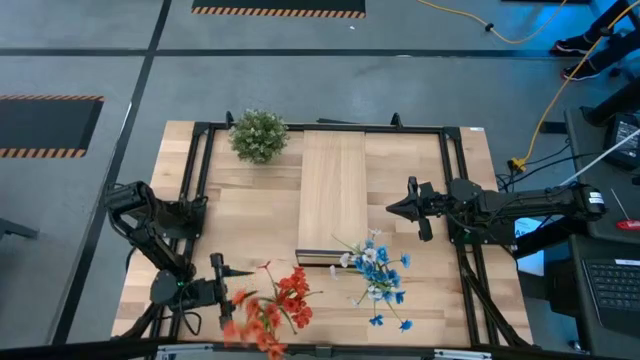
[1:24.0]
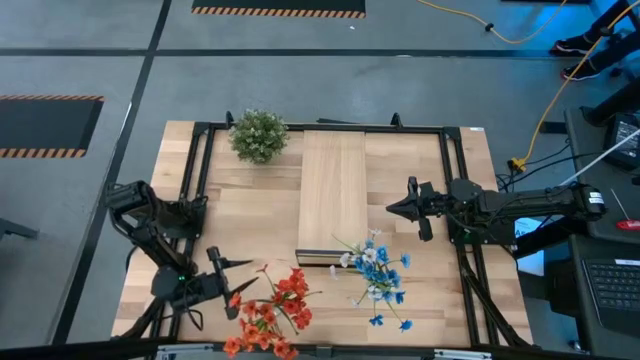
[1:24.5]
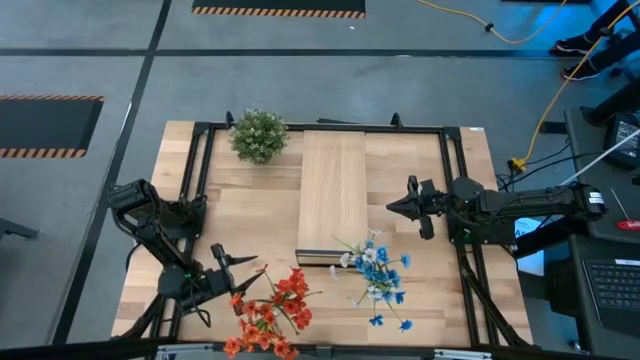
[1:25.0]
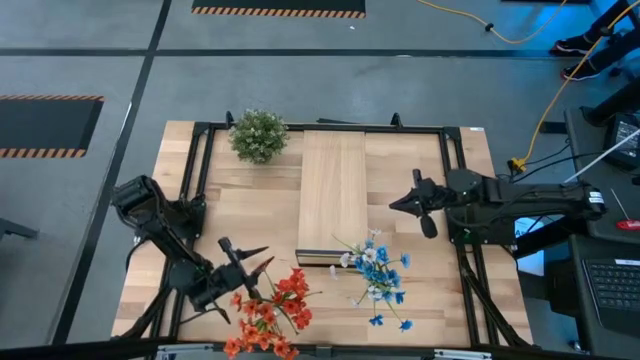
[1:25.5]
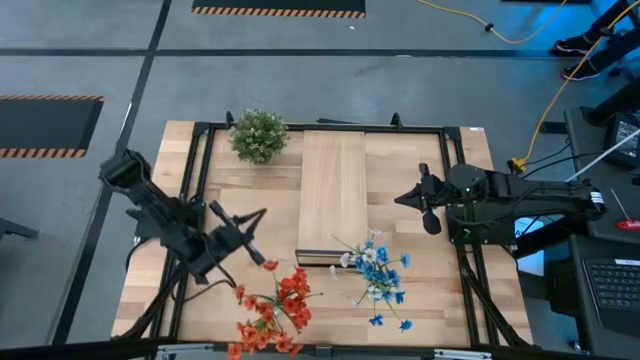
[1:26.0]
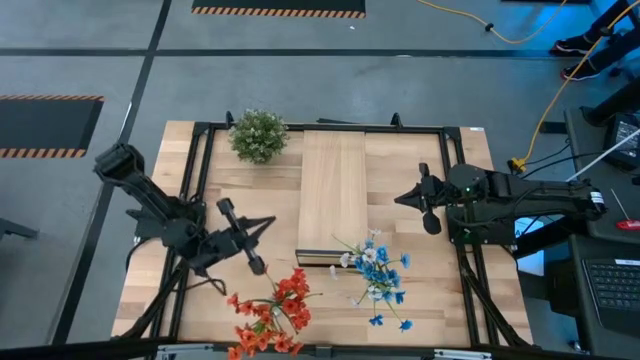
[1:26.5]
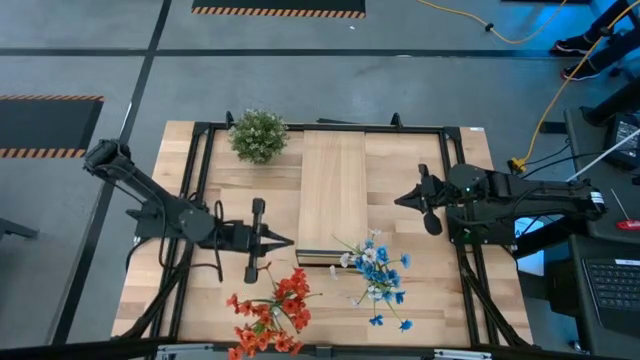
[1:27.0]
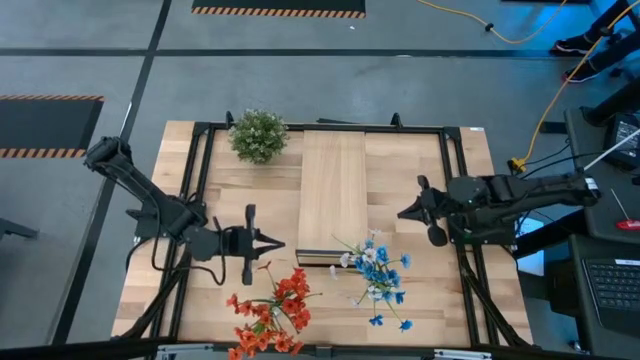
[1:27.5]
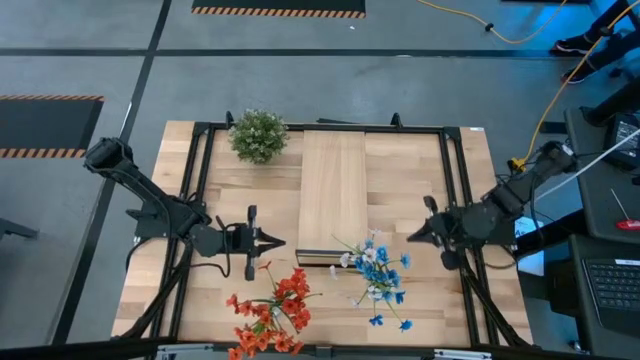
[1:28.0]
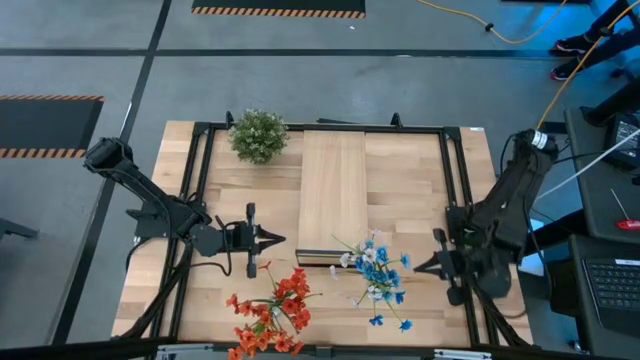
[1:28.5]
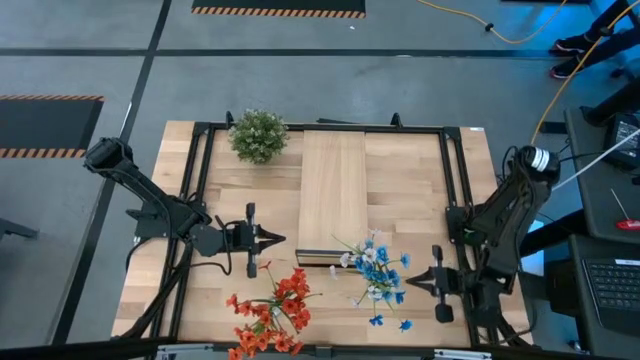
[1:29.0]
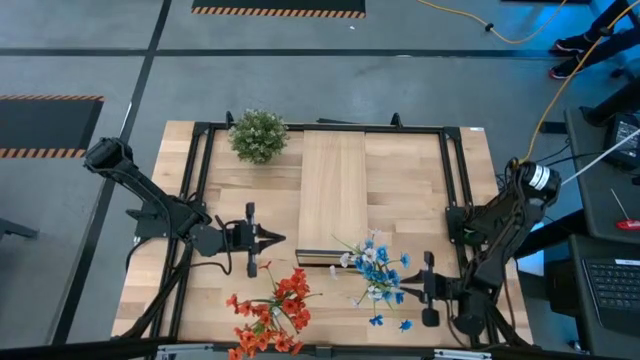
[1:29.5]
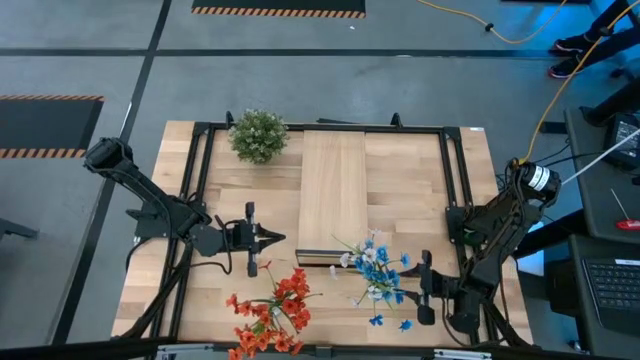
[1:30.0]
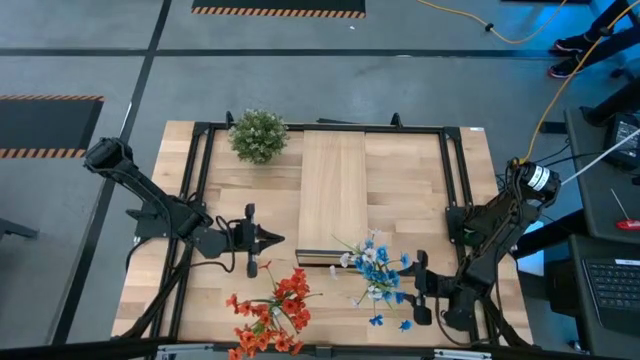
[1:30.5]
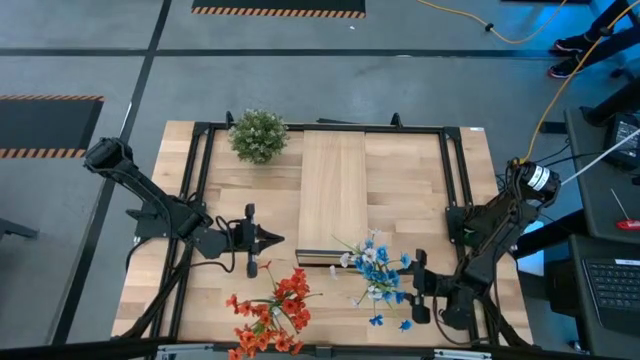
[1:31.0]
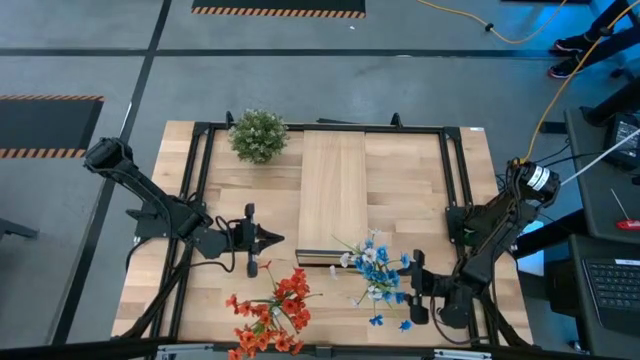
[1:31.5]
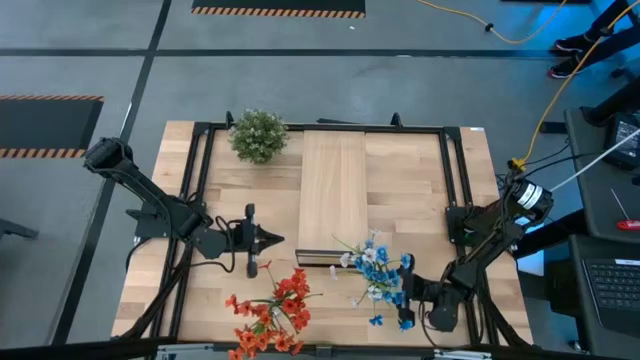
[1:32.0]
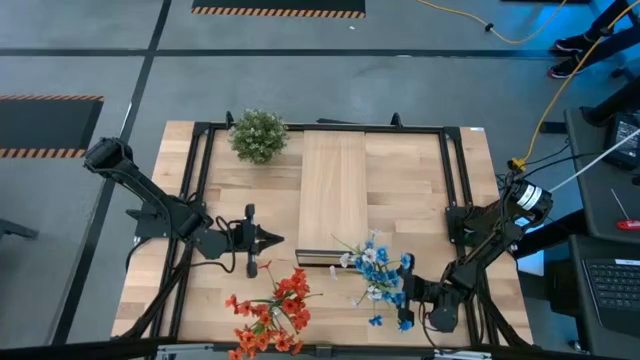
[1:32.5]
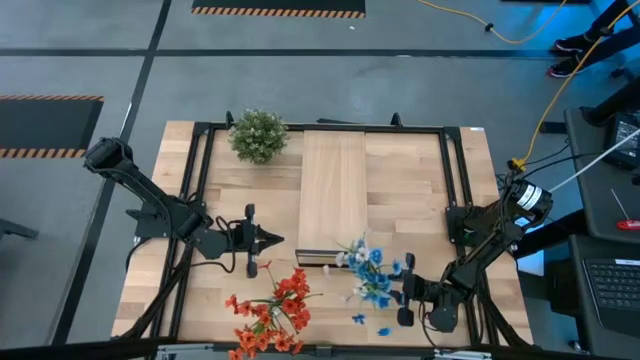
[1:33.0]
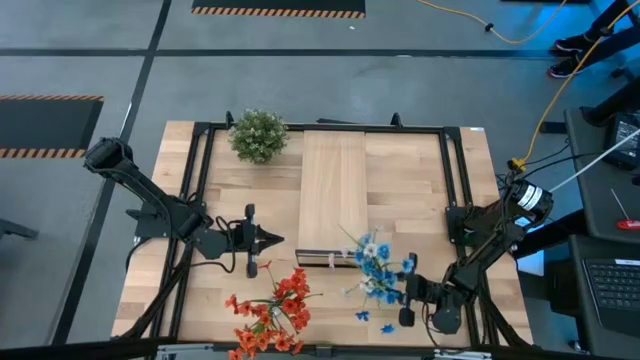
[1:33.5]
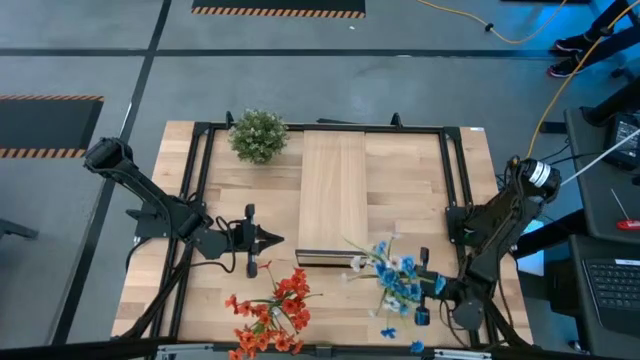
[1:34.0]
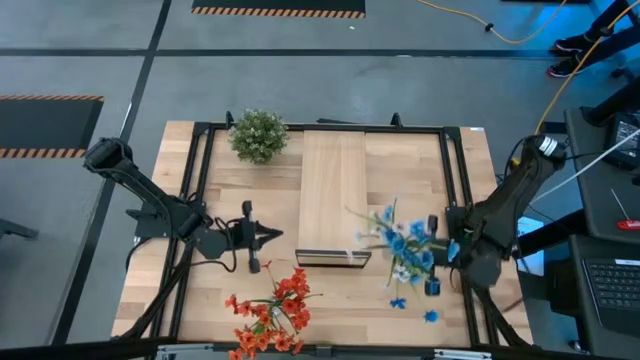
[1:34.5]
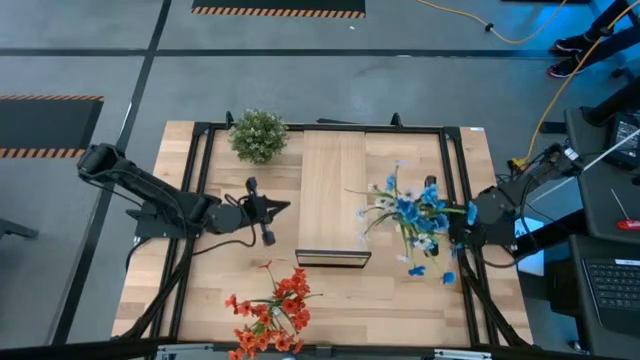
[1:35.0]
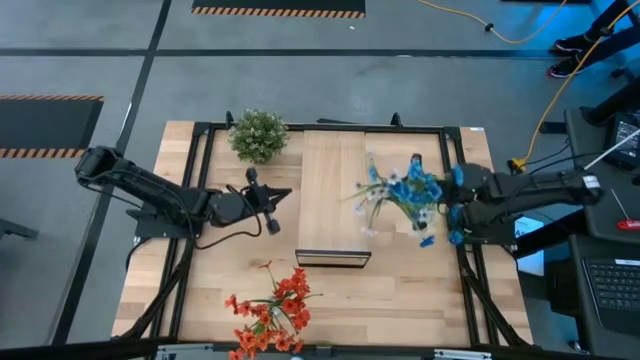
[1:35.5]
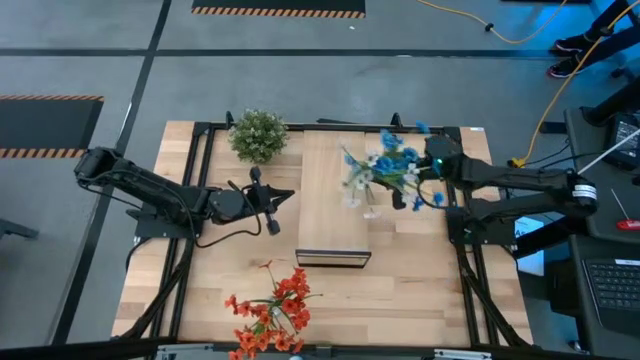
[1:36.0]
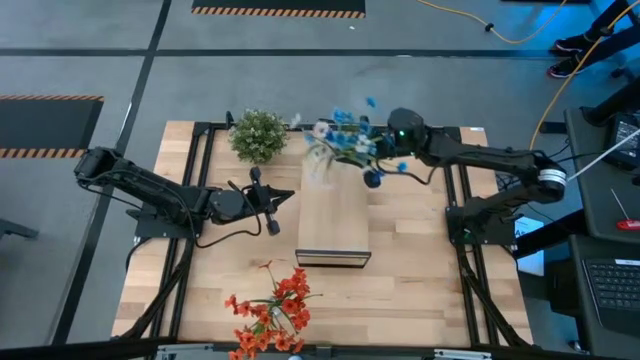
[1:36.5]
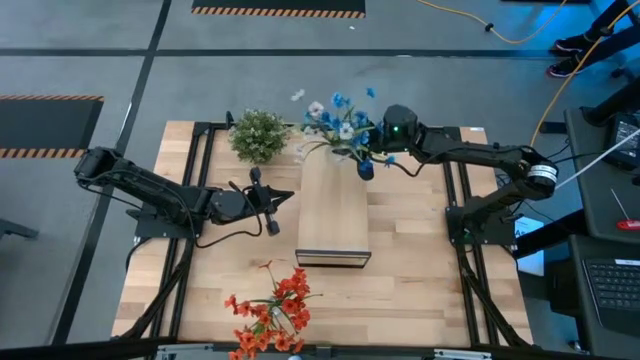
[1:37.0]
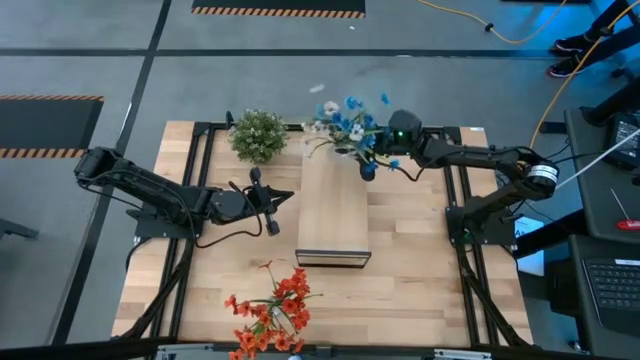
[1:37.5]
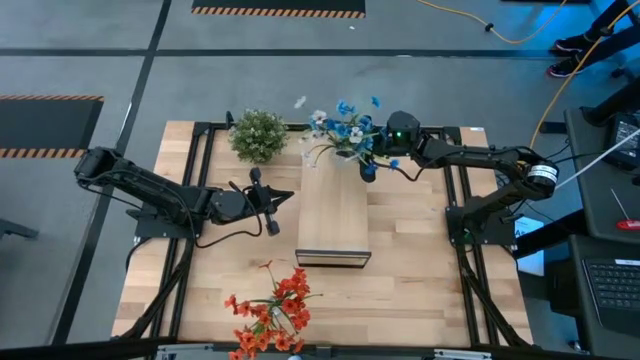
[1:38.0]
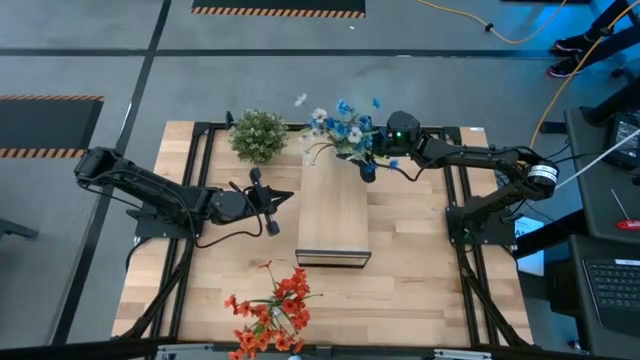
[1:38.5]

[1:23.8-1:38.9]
Task: Pick and place flowers into a vace then onto a shelf
Put the right transparent flower vase with flowers on the shelf

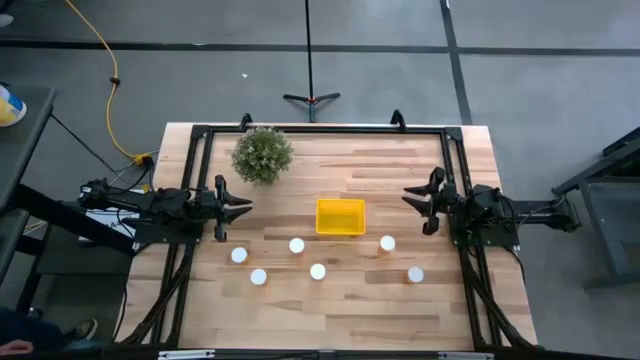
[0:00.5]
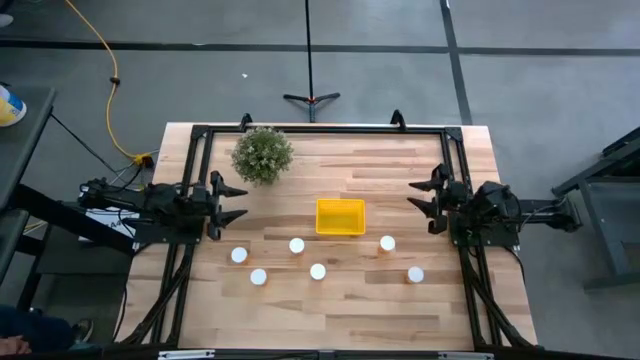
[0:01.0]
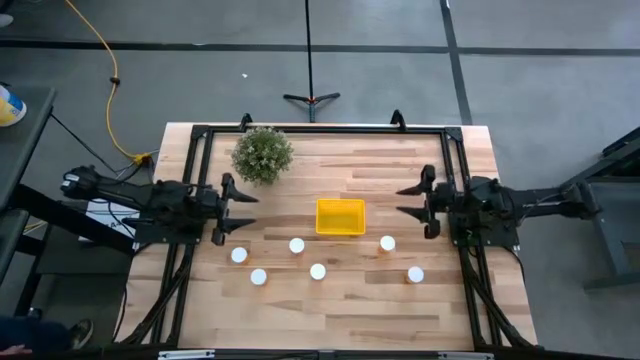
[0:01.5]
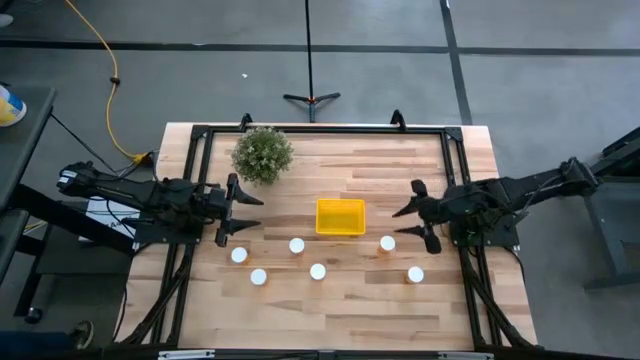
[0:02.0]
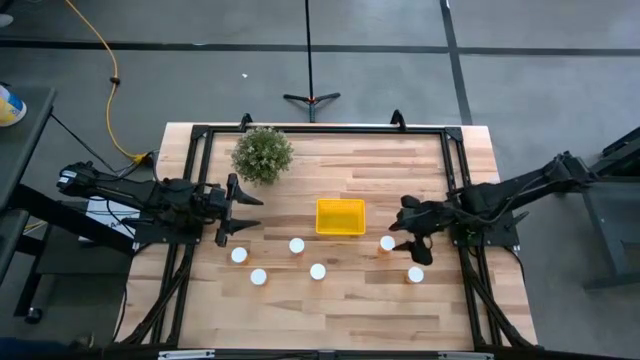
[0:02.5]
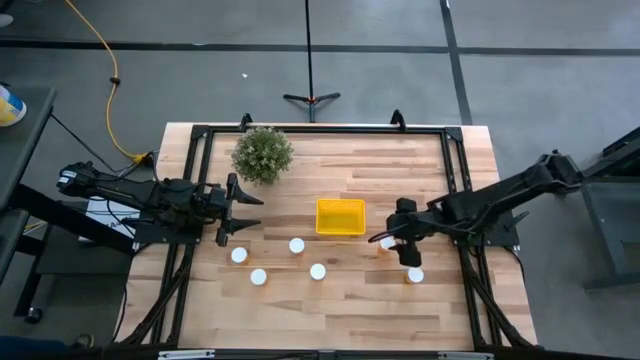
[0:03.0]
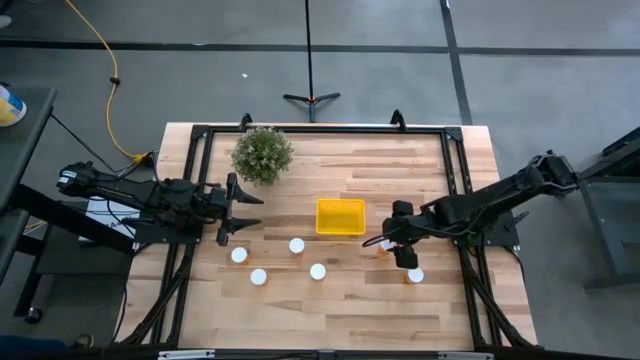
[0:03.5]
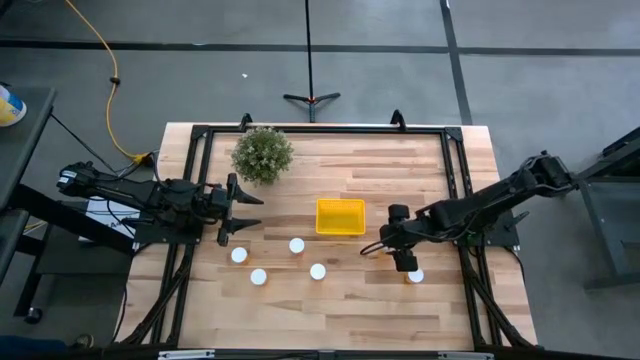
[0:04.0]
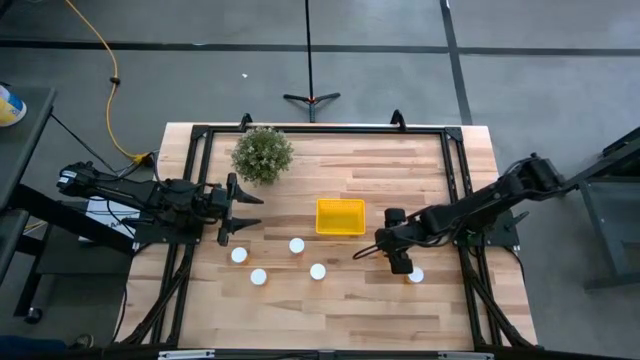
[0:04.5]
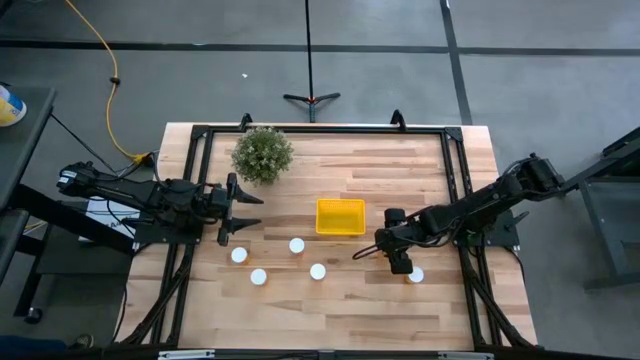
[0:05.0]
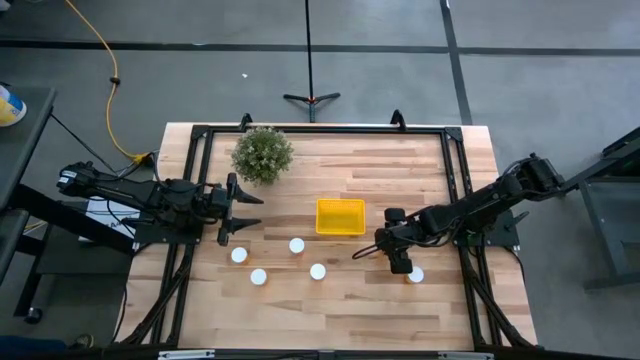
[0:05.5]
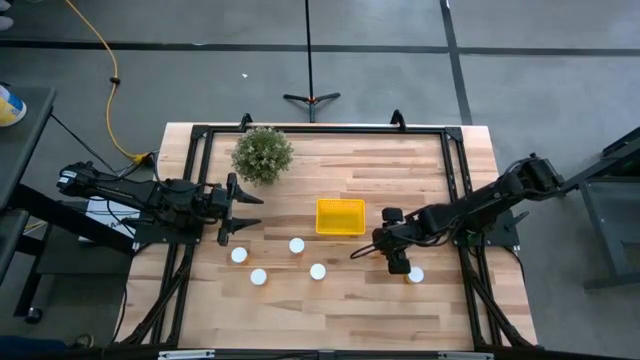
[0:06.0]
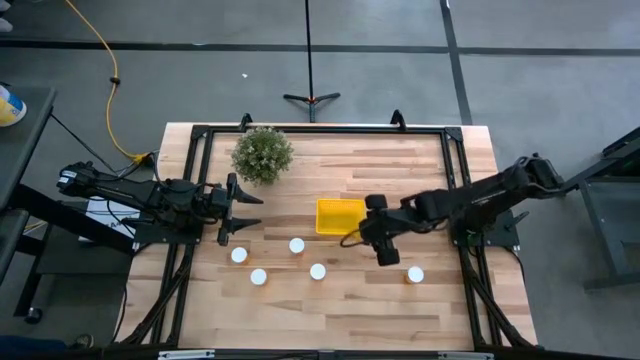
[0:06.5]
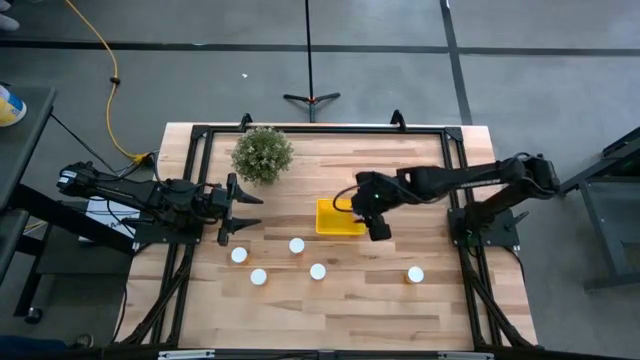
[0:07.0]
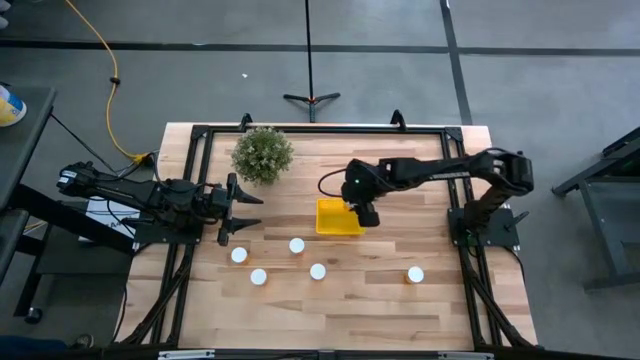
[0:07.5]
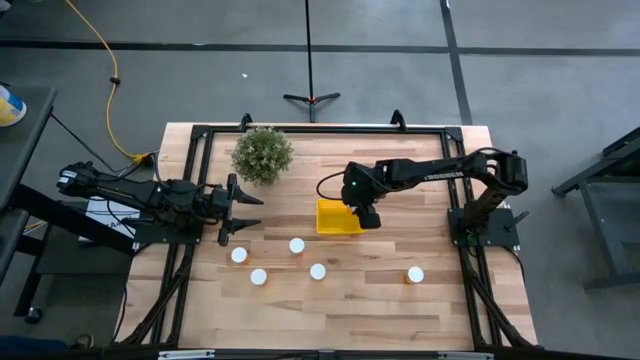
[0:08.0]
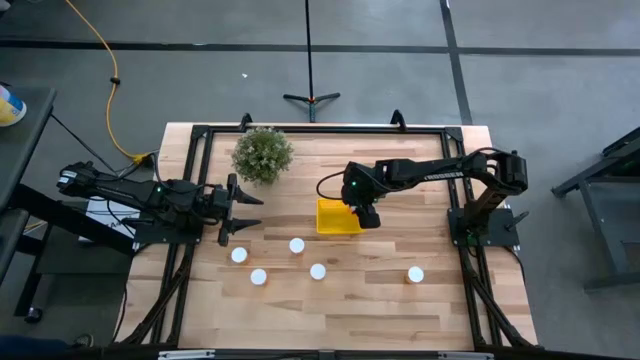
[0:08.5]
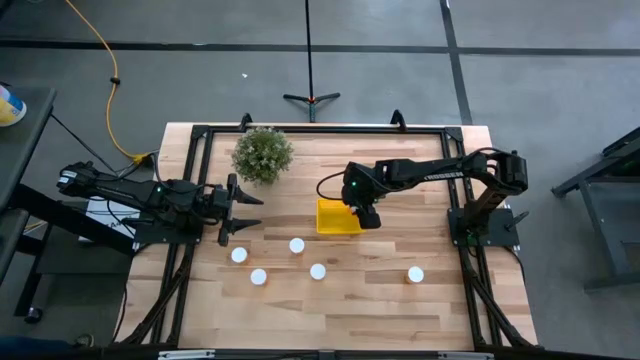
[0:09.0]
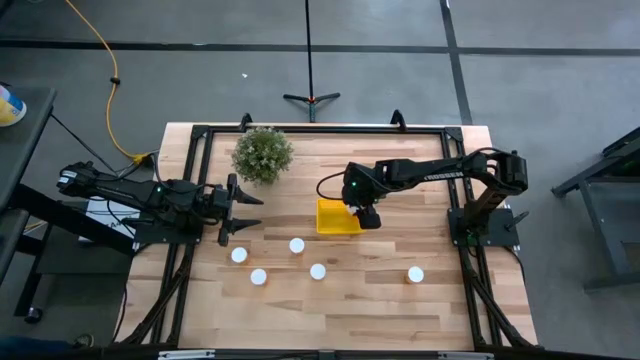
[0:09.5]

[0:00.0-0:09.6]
Task: Pick and place pill bottles into a basket
Put the orange pill bottle into the top right corner of the yellow basket
